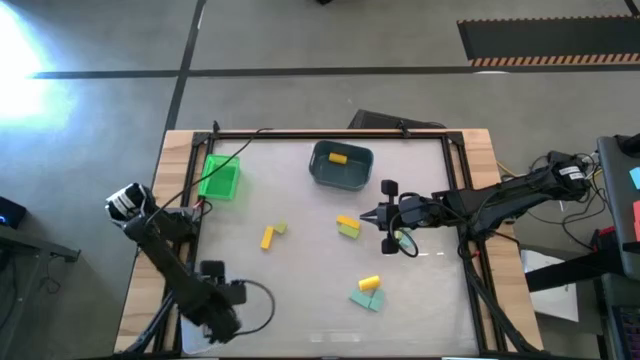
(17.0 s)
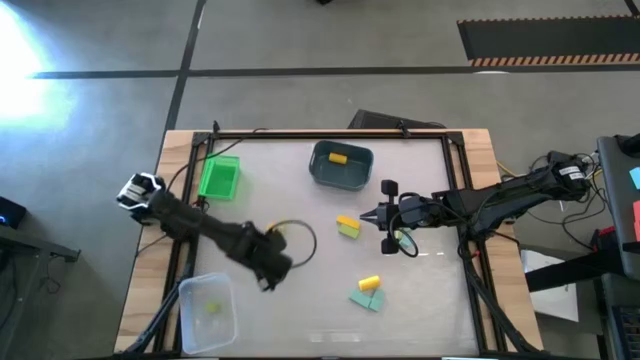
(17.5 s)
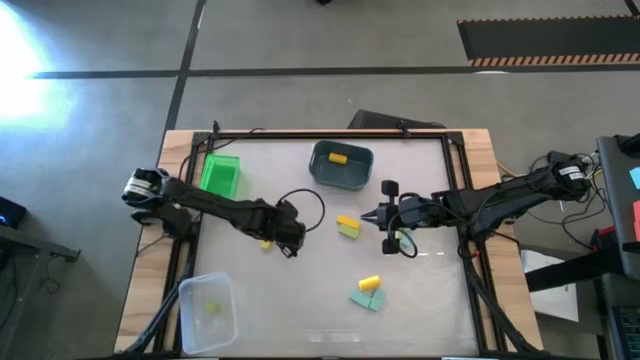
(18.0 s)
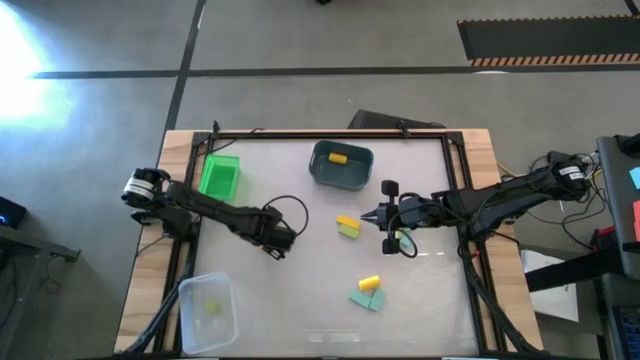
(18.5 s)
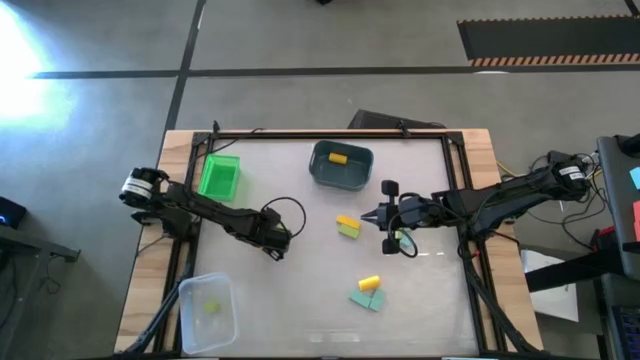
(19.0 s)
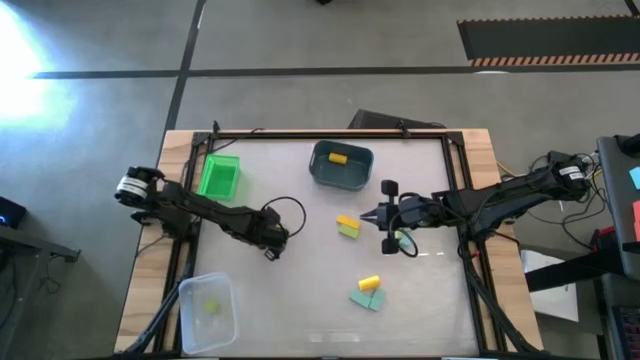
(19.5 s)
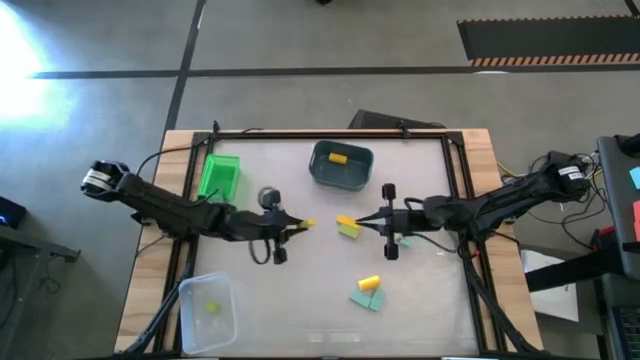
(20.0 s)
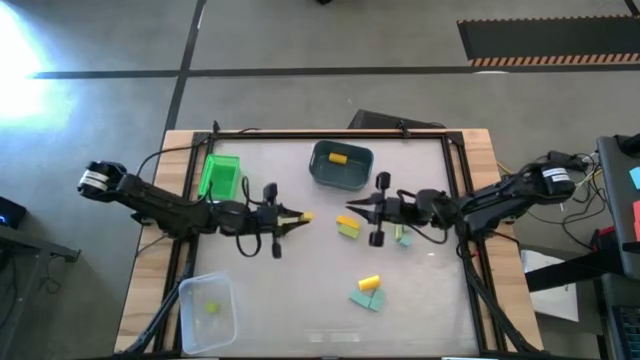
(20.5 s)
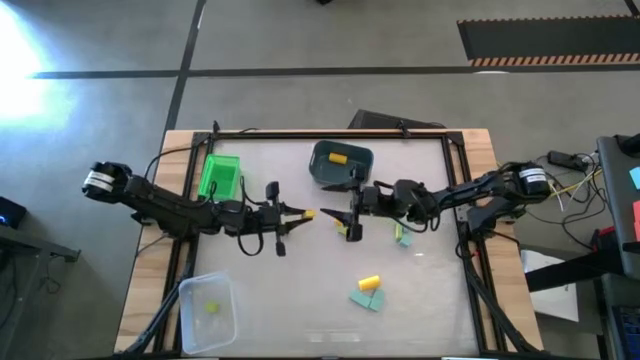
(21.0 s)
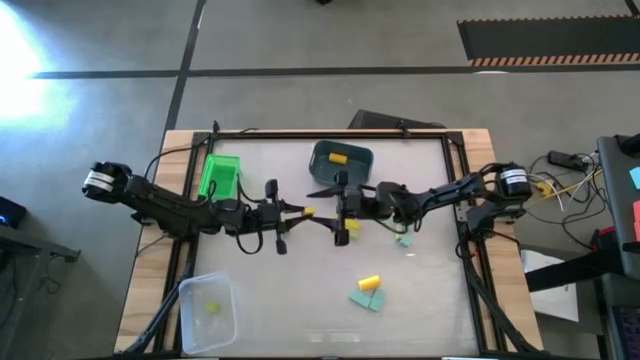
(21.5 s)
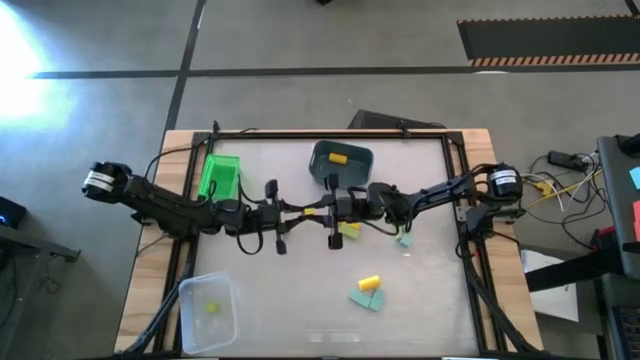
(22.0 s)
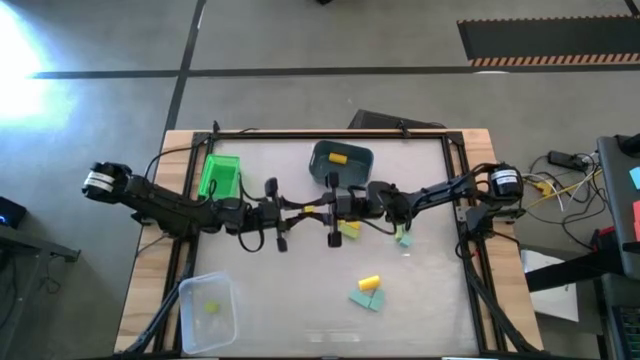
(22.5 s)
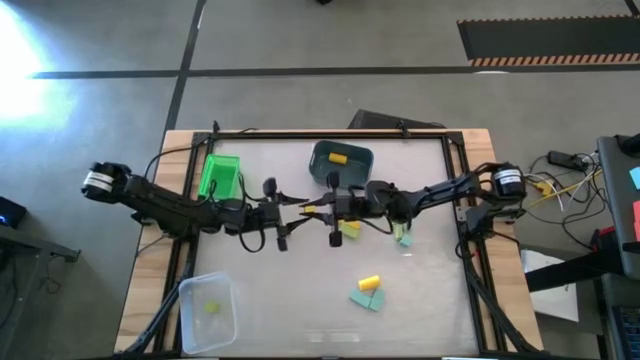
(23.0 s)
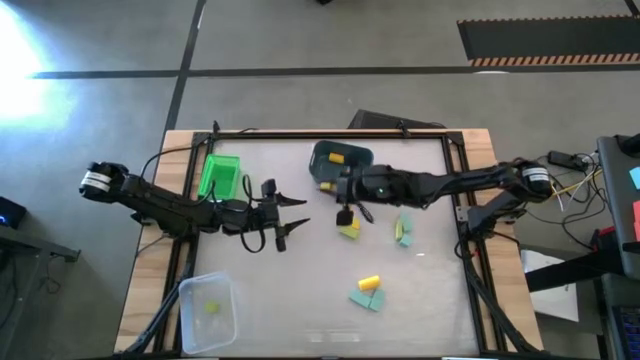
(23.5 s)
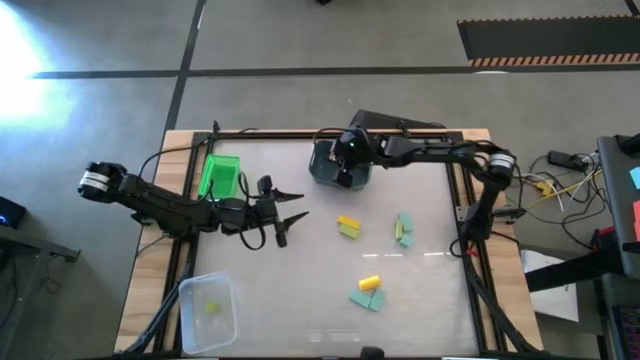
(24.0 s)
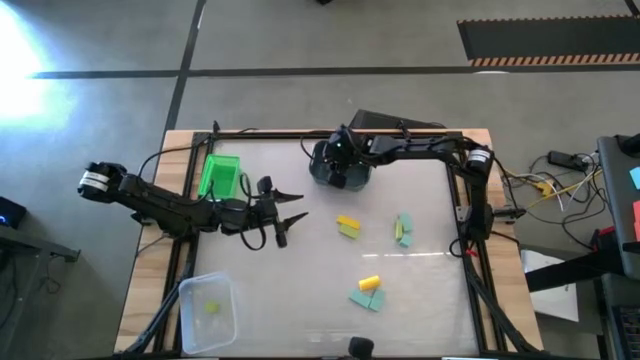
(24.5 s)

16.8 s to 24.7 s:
Task: Sort & place blocks by color
Put the yellow block into the blue bin

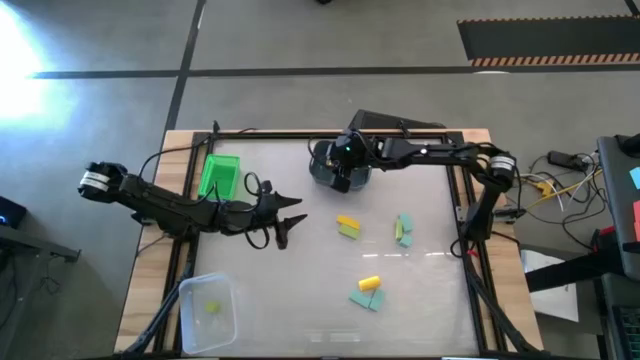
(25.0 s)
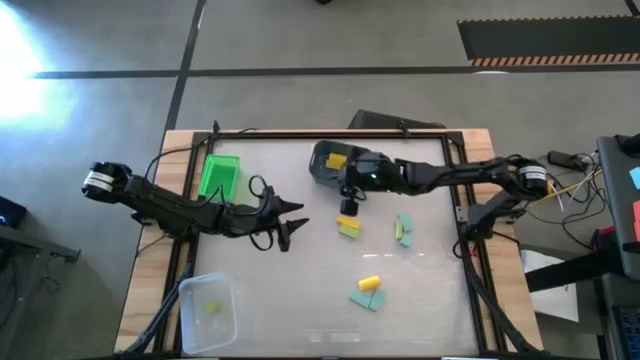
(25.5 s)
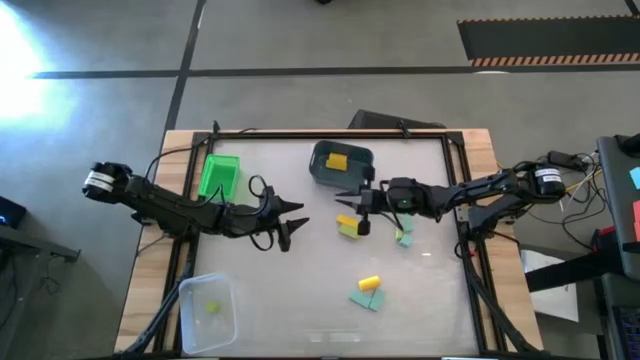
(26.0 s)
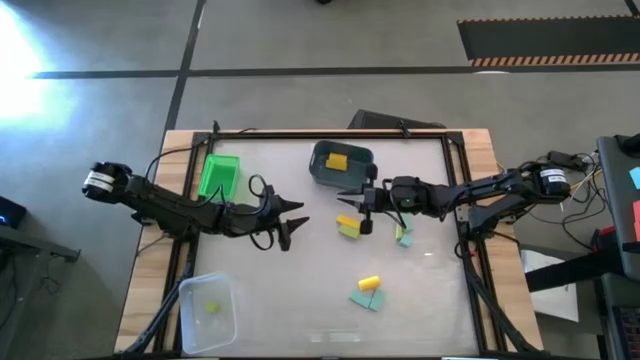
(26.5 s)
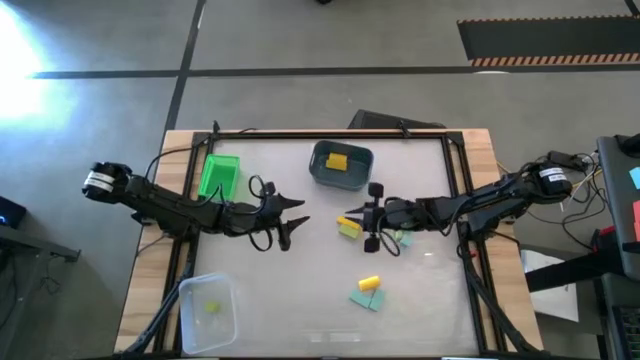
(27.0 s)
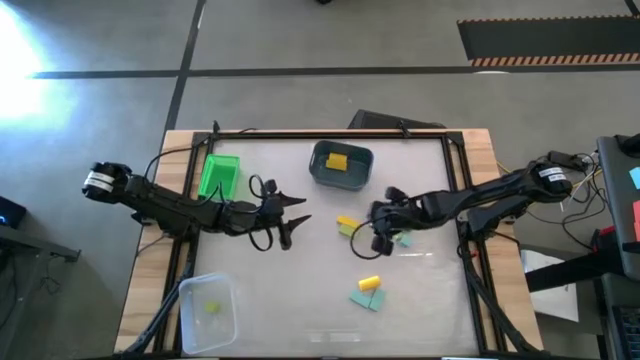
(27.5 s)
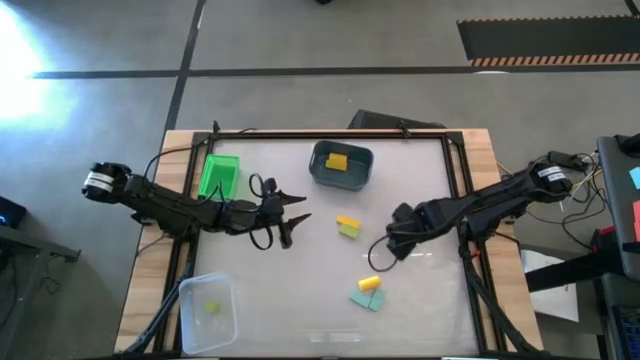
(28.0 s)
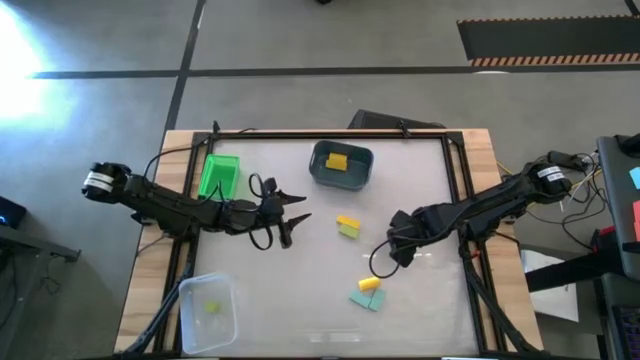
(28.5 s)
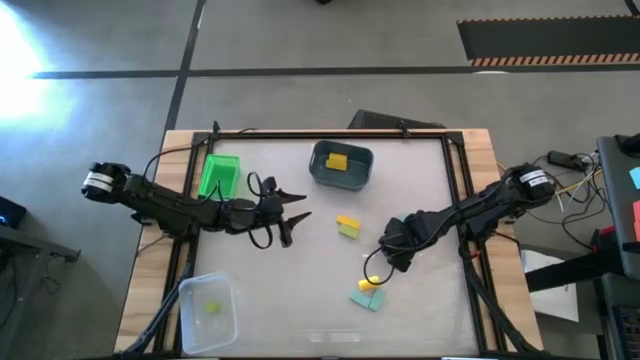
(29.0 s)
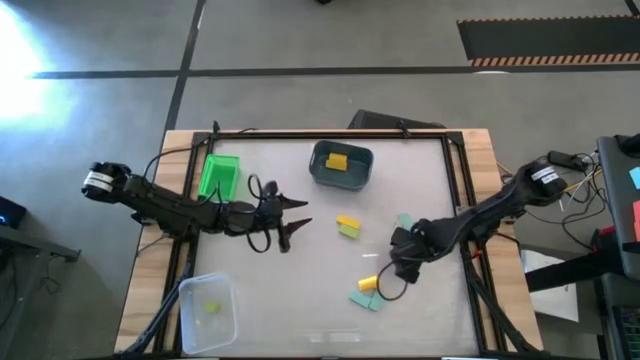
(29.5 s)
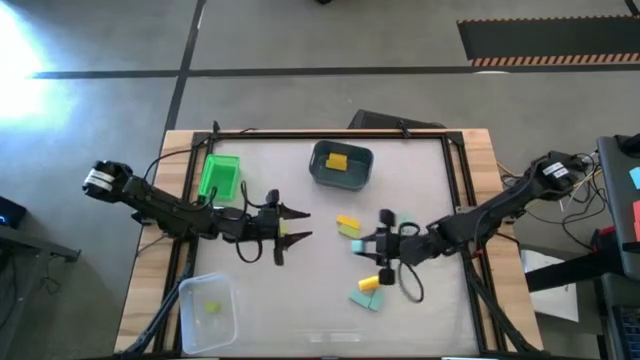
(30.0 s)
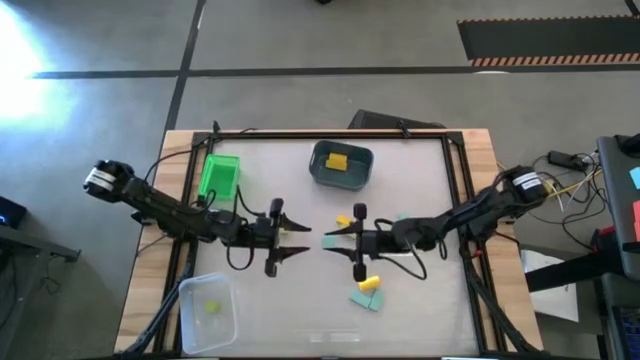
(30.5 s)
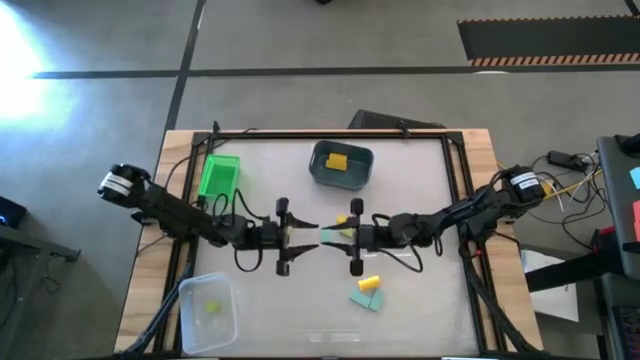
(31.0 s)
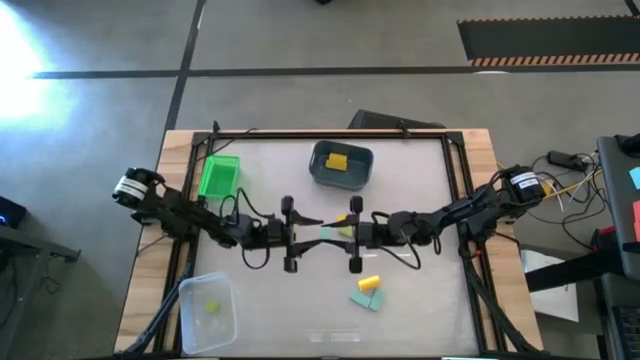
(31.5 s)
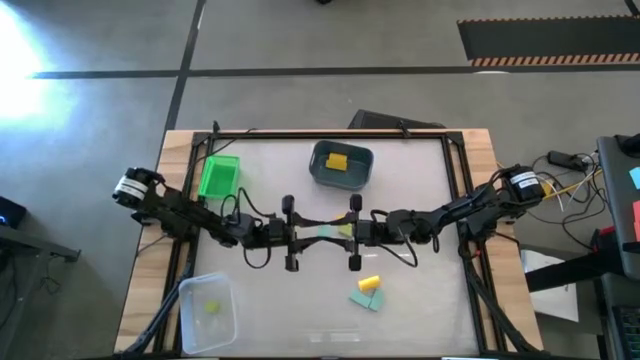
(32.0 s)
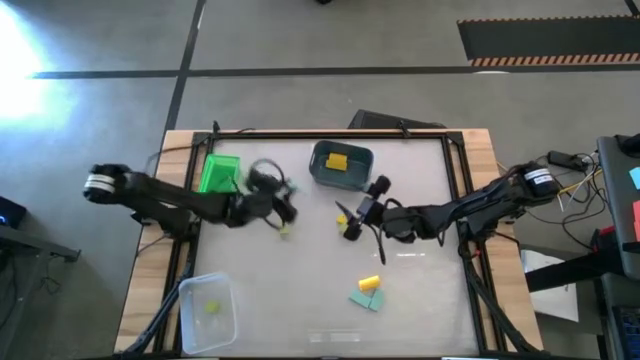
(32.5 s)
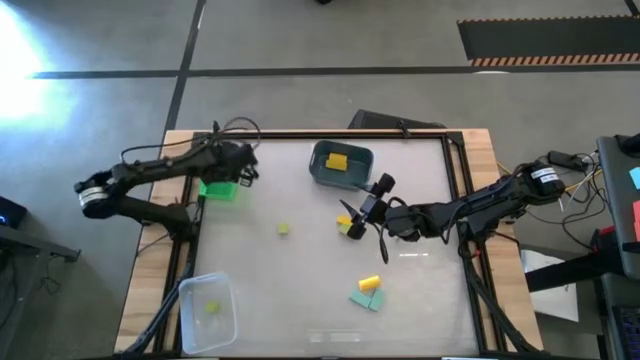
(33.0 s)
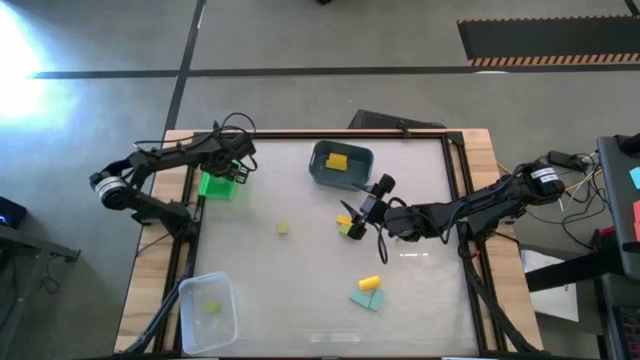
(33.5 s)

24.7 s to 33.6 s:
Put the blue block into the green bin

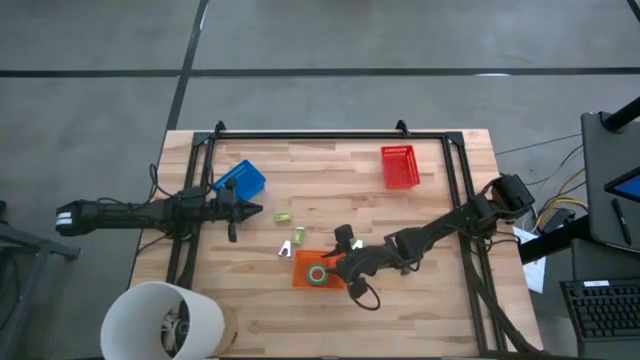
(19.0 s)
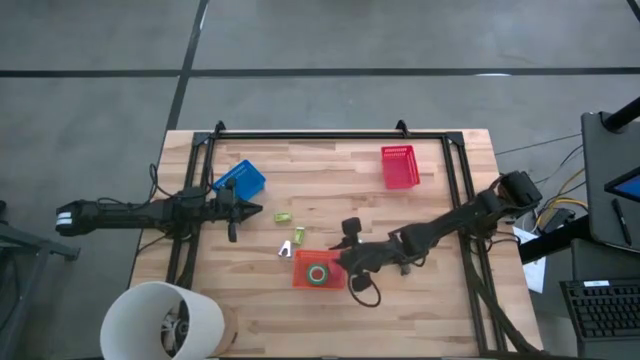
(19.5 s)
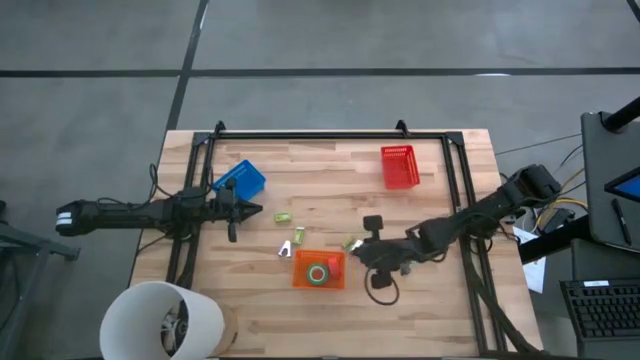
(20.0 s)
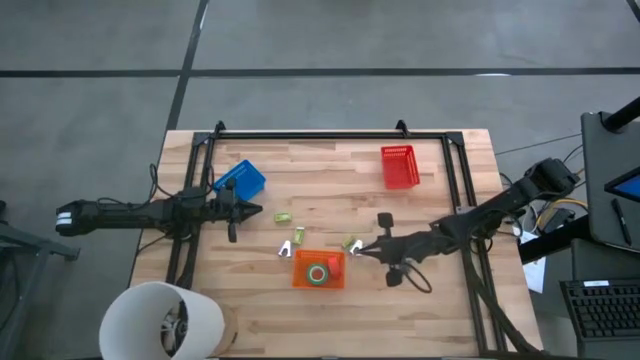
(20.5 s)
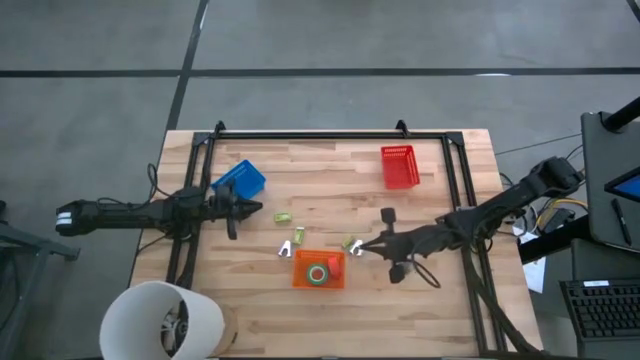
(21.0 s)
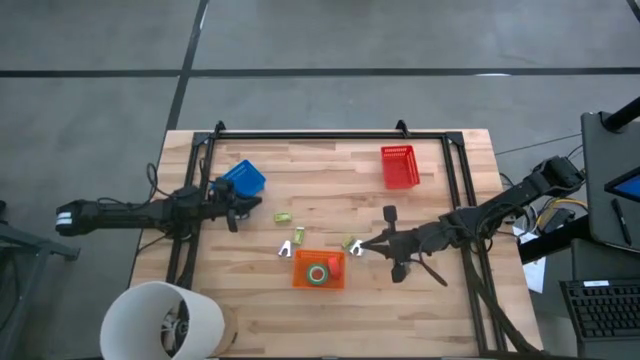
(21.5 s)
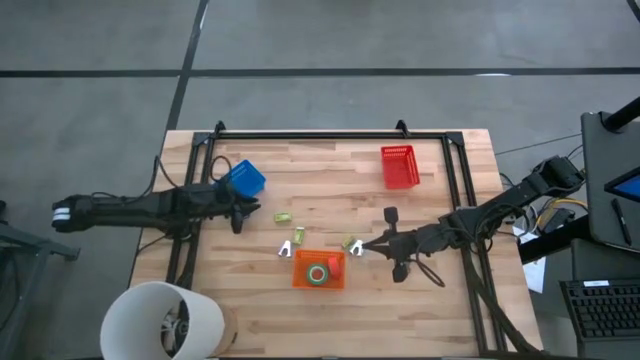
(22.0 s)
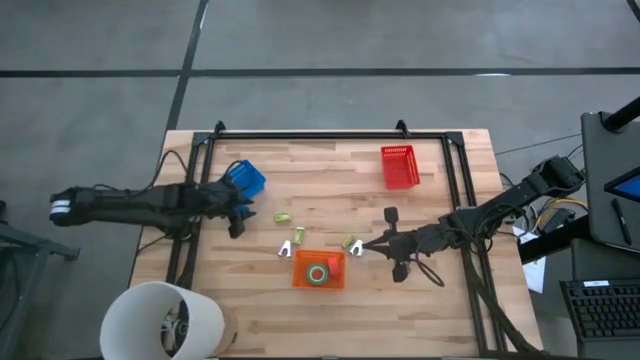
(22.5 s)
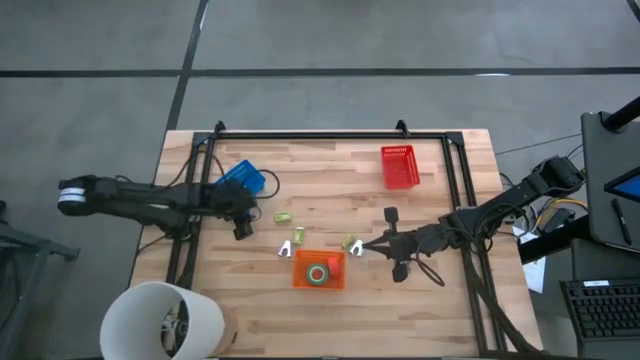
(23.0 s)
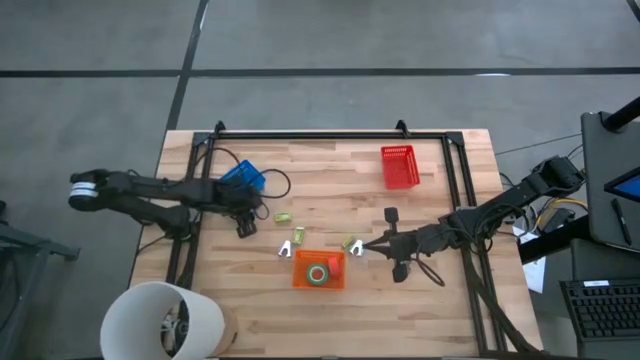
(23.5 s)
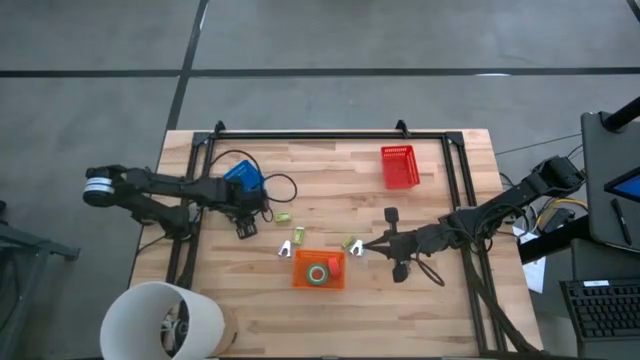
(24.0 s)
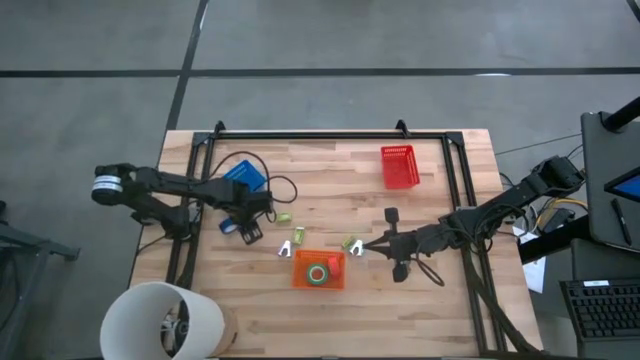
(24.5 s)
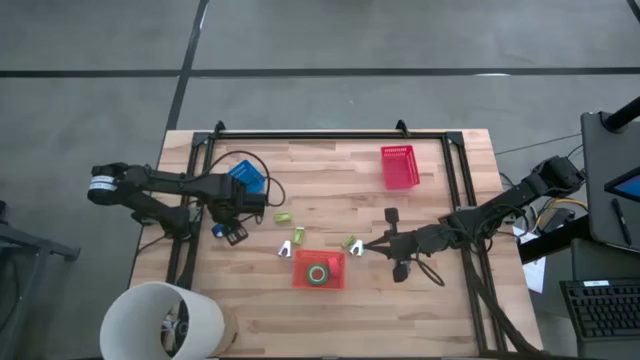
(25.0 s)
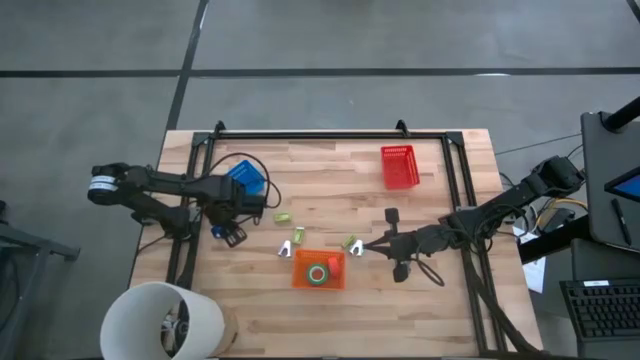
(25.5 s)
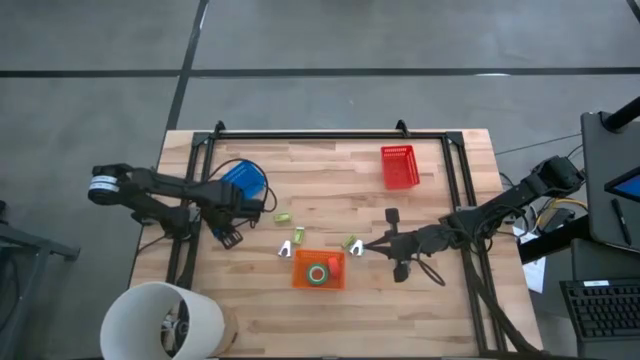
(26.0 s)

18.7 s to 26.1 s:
Task: Pick and place Stapler, Stapler remover, tape
Put the blue tape into the orange bin
